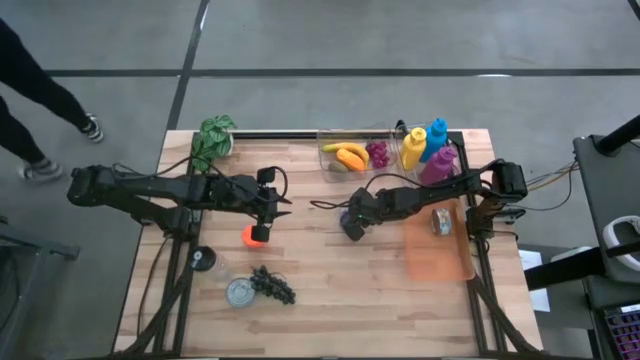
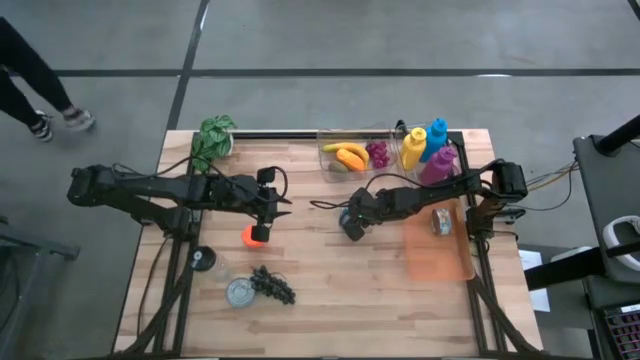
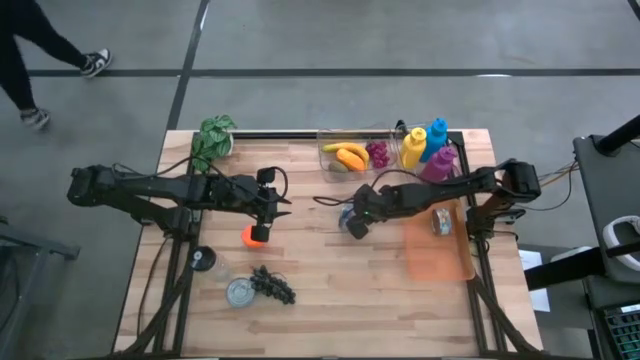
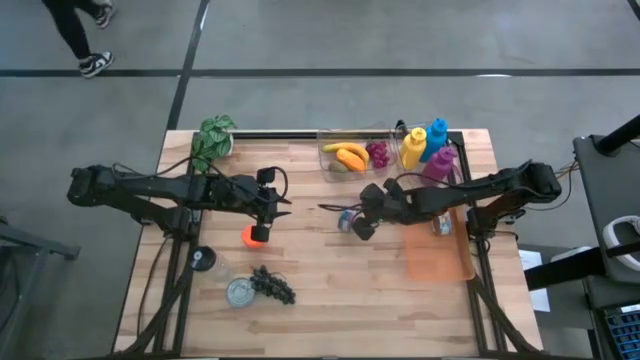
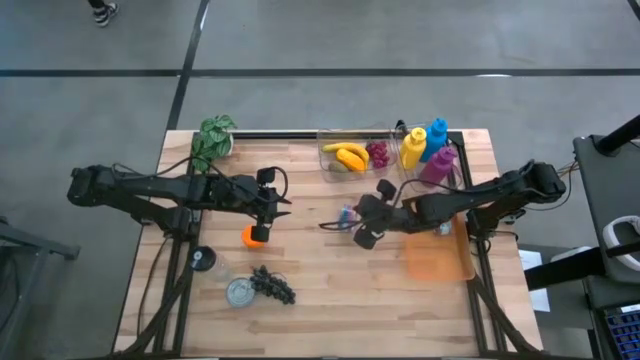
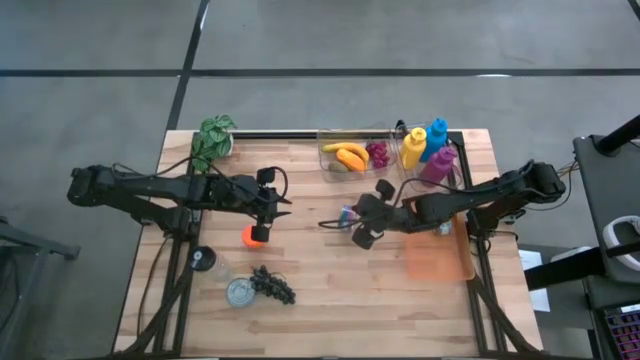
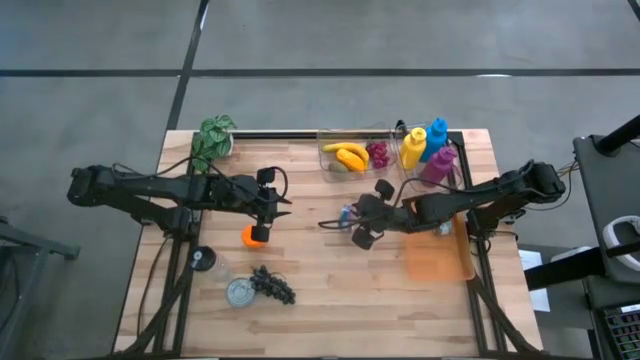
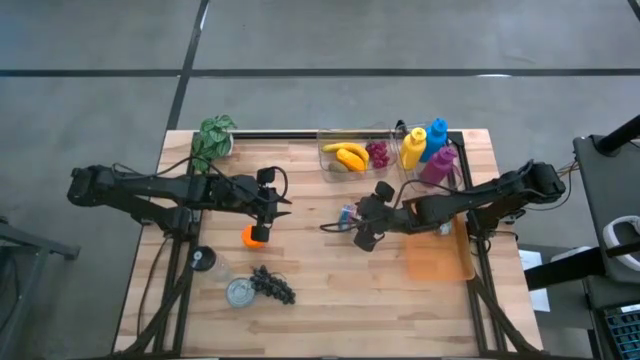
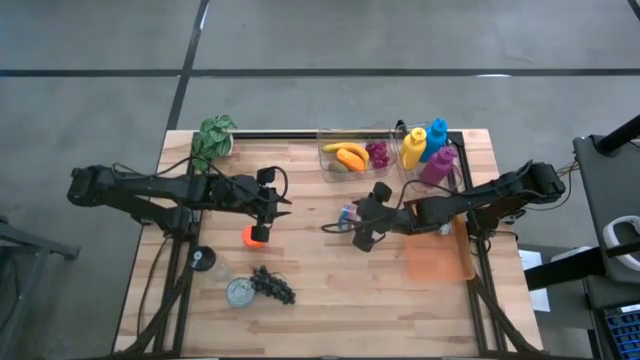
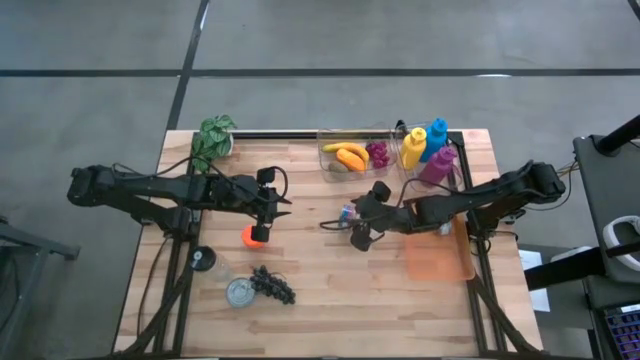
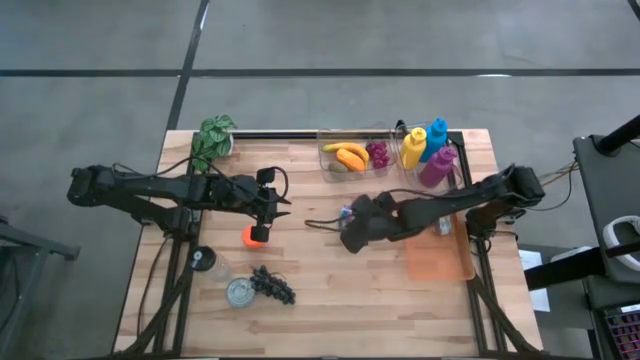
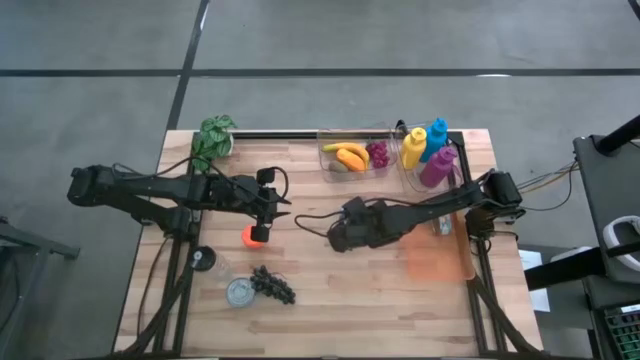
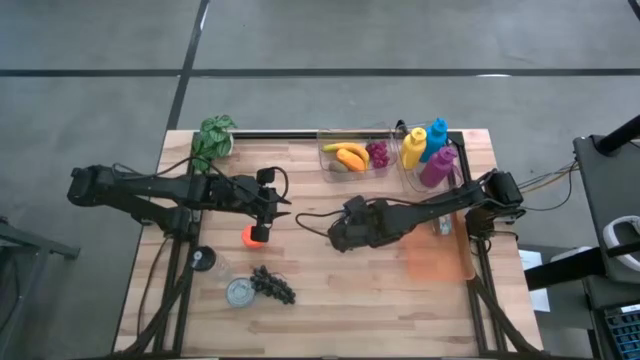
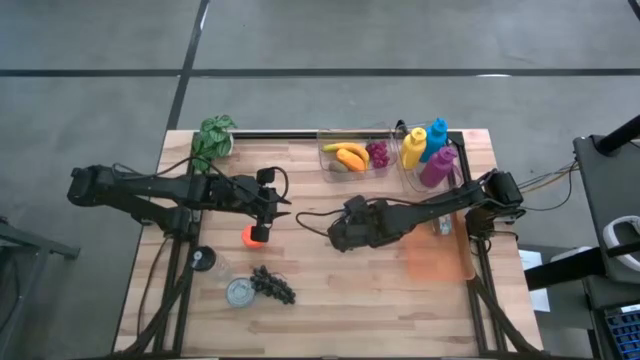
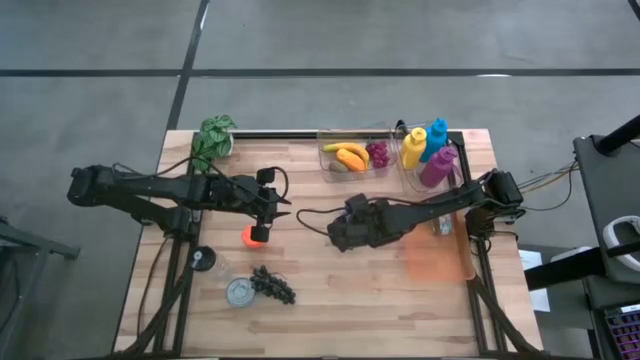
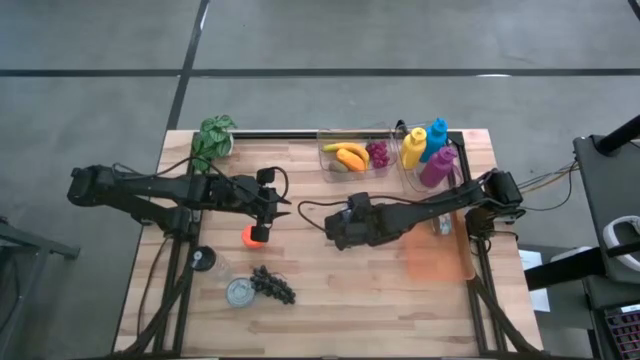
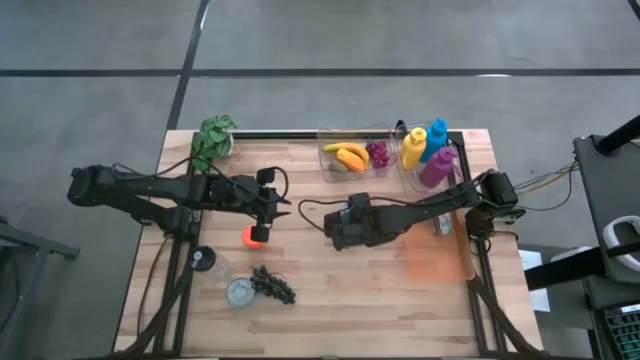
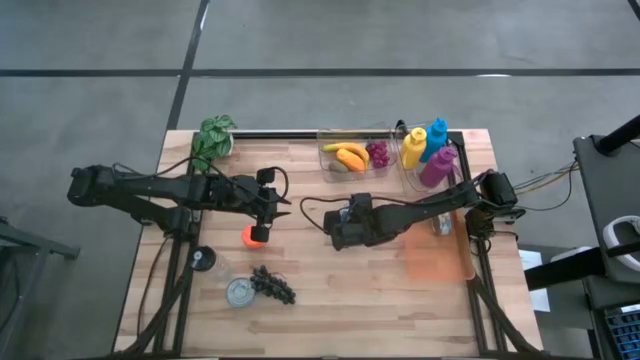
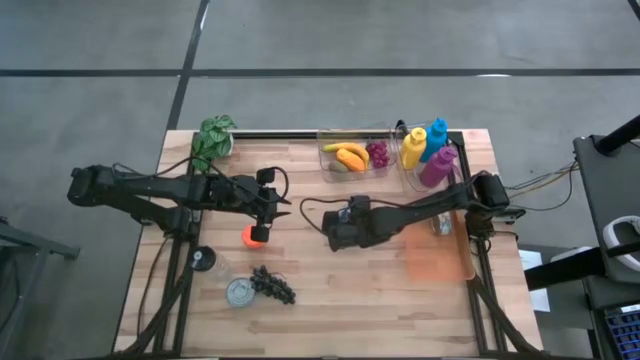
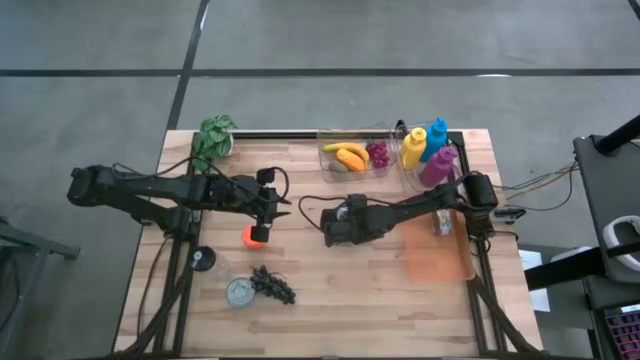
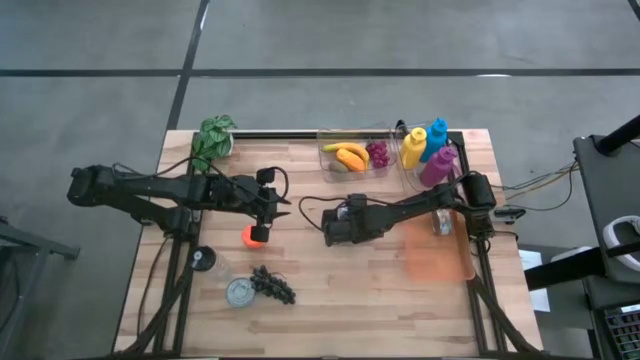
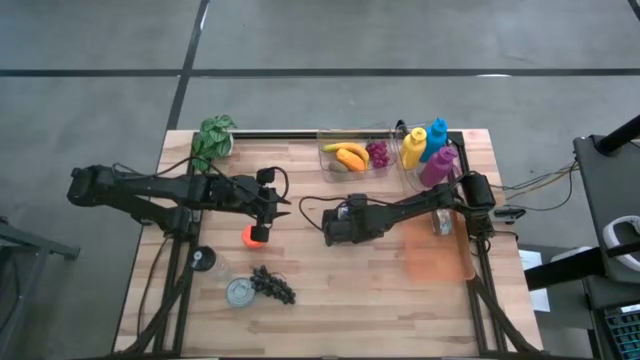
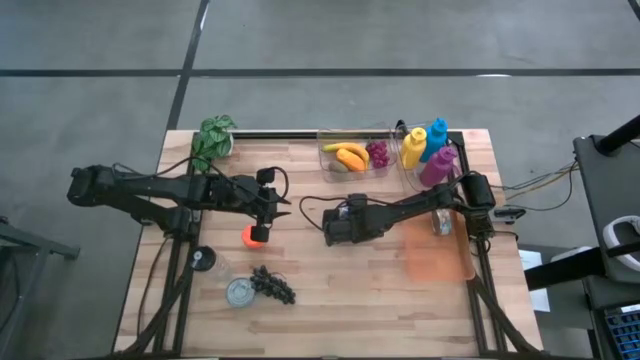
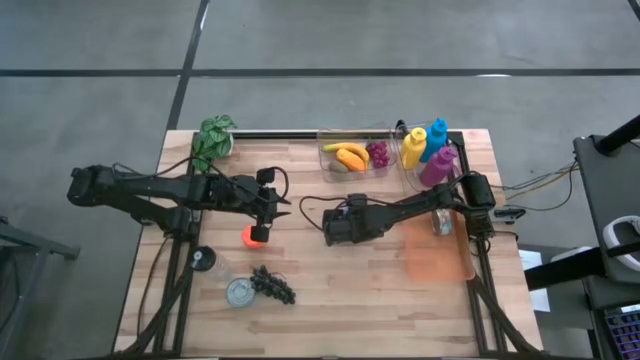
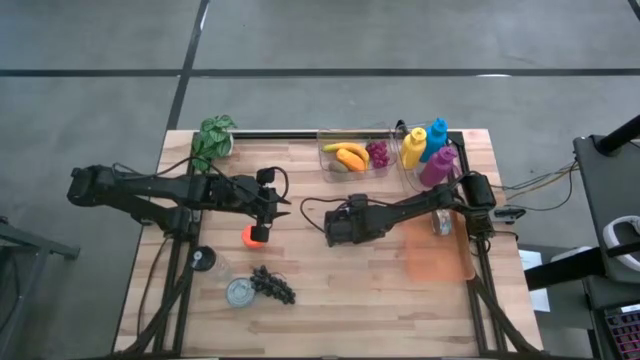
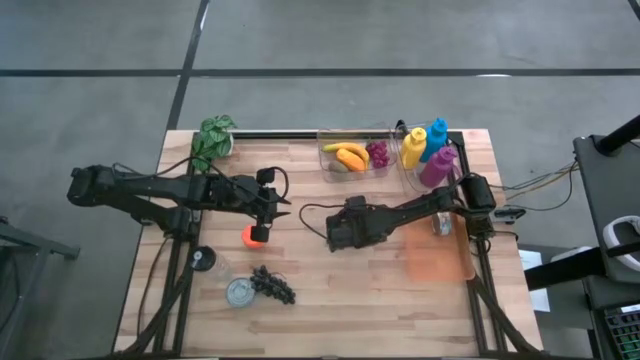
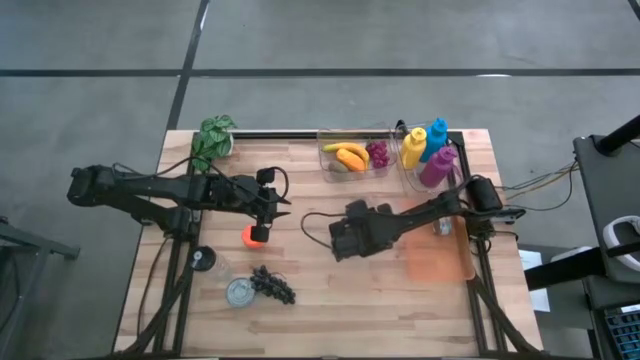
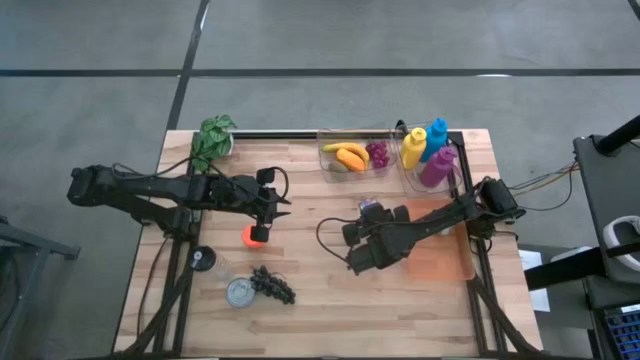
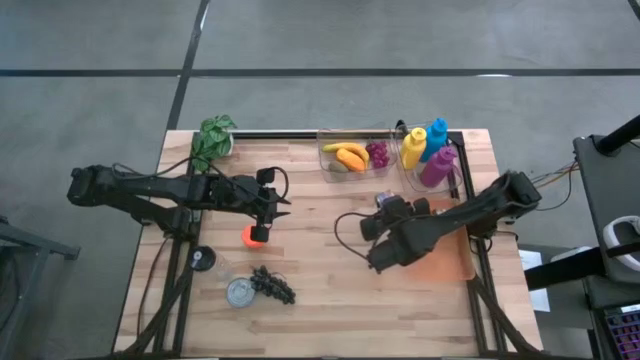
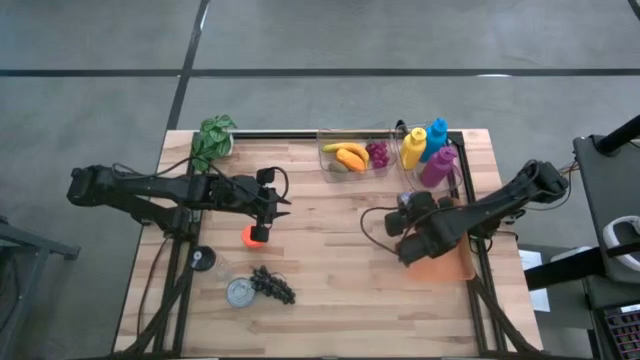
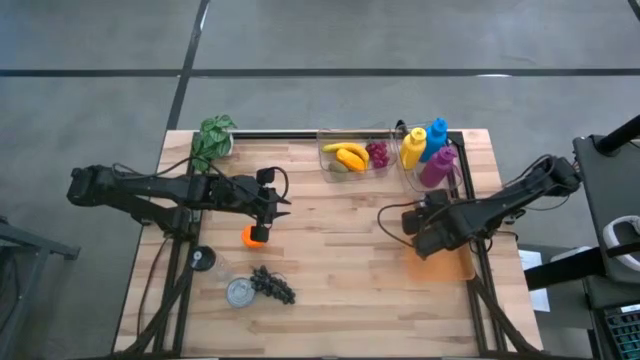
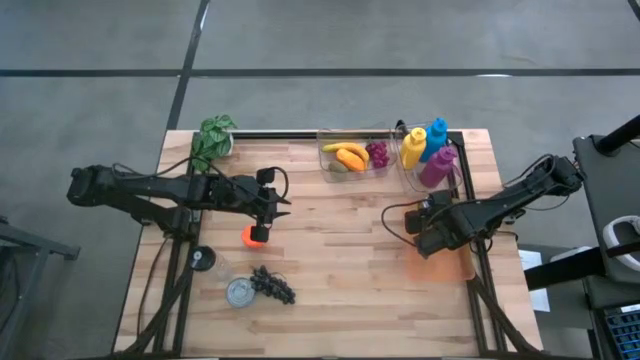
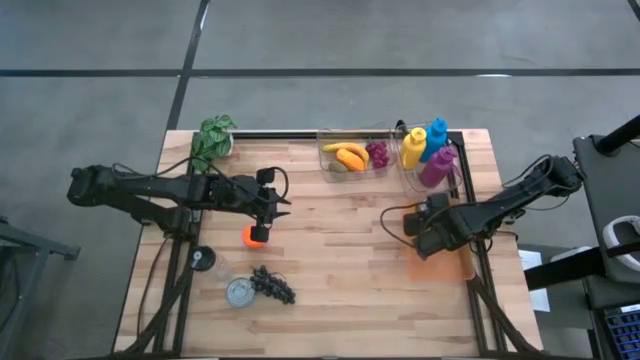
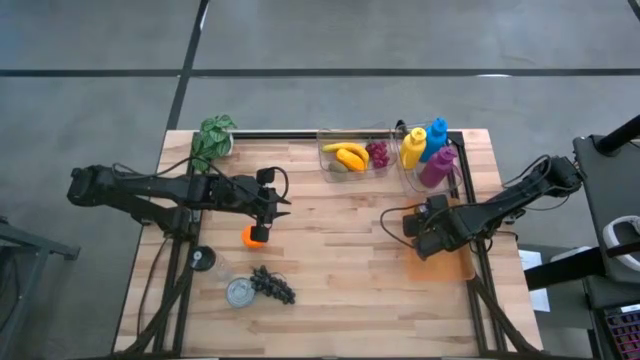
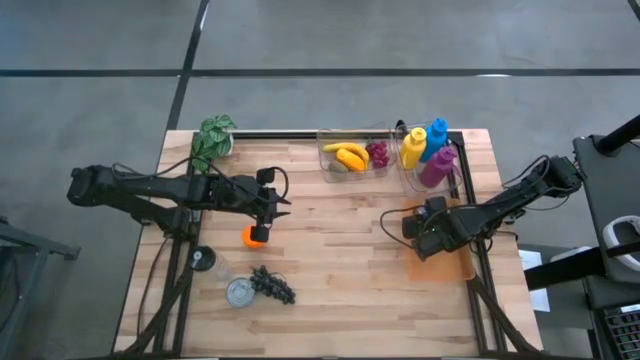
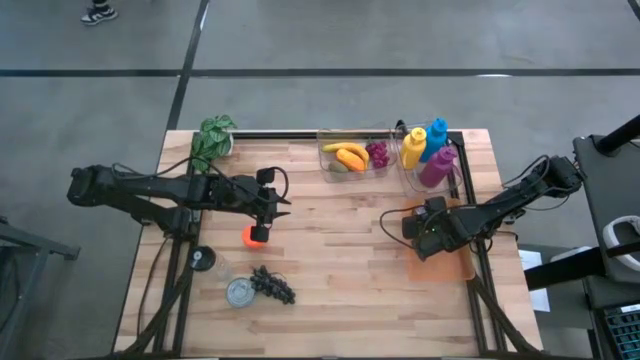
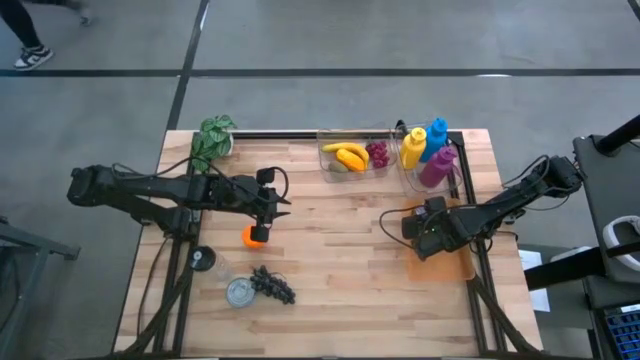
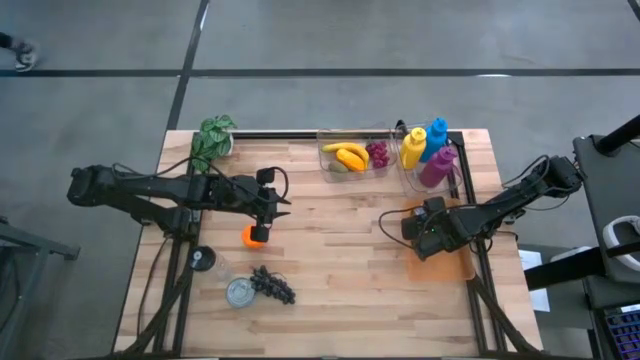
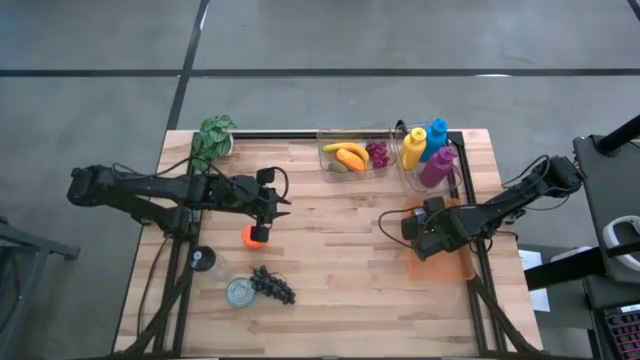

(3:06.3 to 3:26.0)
Task: Pick & Place Food Item
Put the blue and pink tuna can into the orange bin

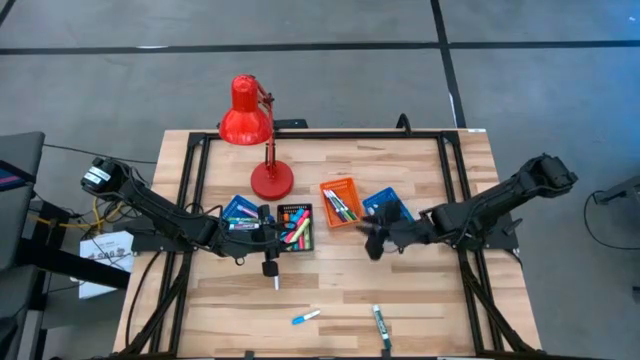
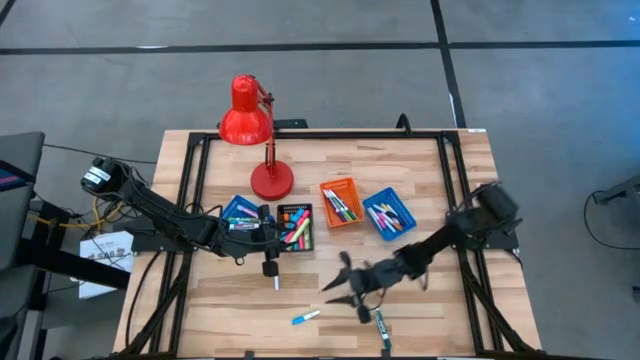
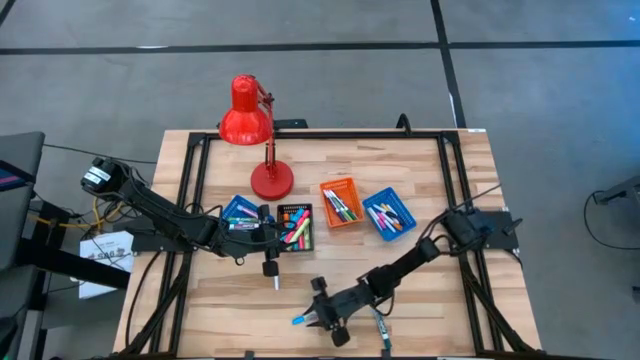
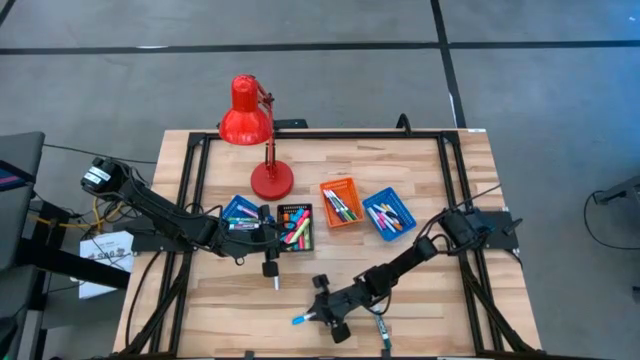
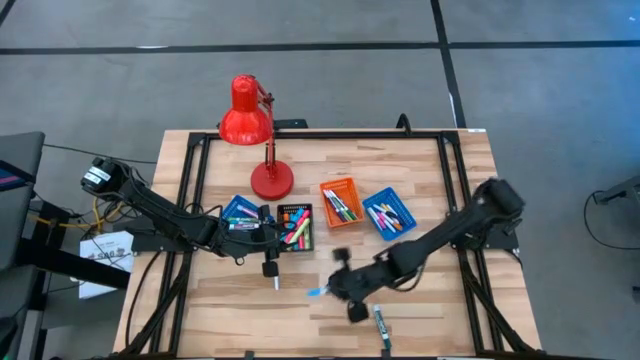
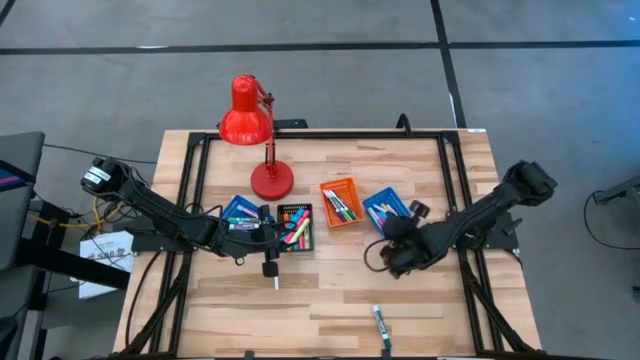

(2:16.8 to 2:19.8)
Task: Pick & Place Markers
Put the small white and blue highlighter pen into the right blue basket

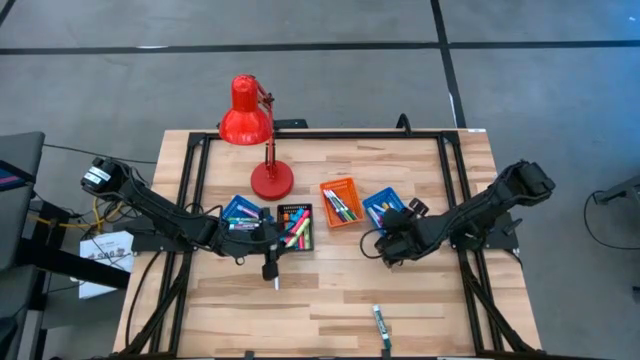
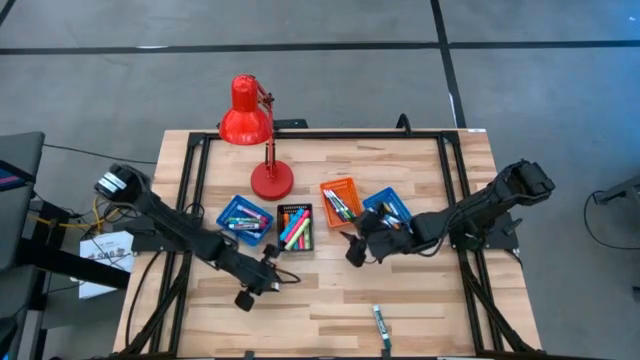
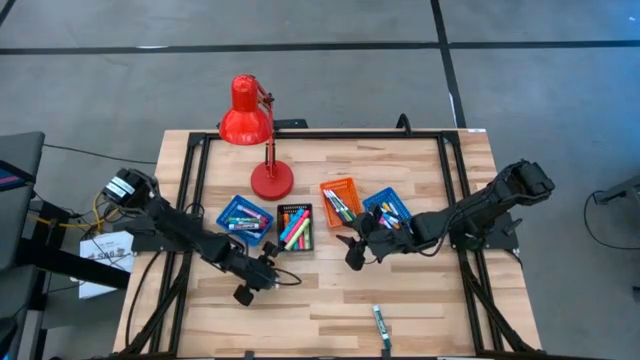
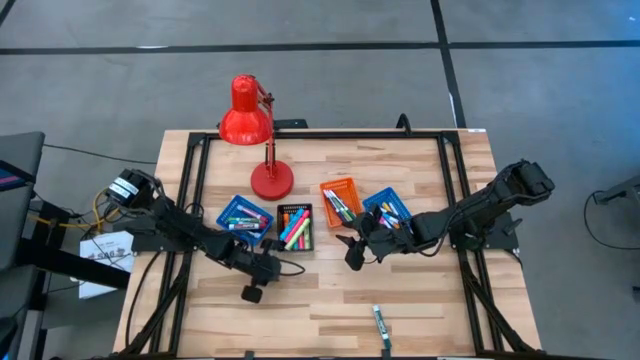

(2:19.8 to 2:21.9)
Put the small white and orange highlighter pen into the right blue basket
